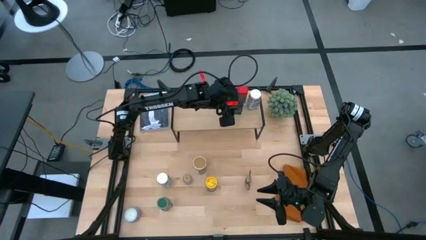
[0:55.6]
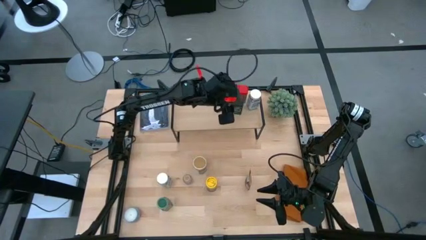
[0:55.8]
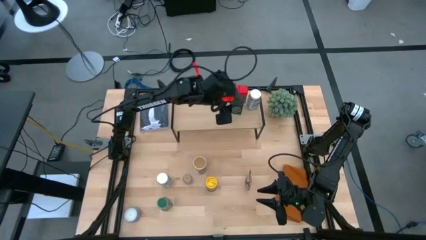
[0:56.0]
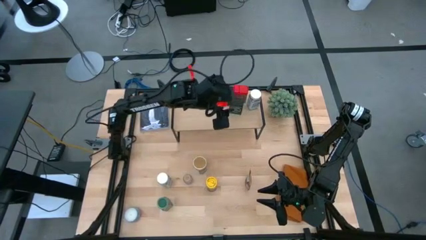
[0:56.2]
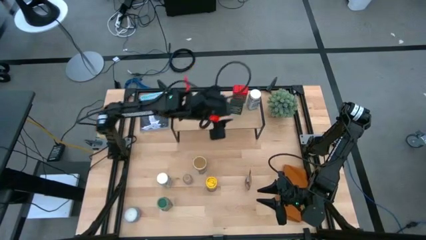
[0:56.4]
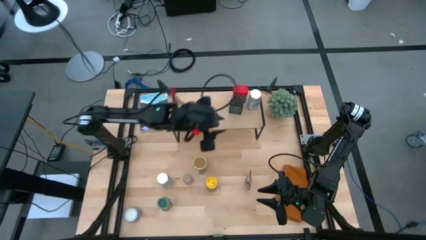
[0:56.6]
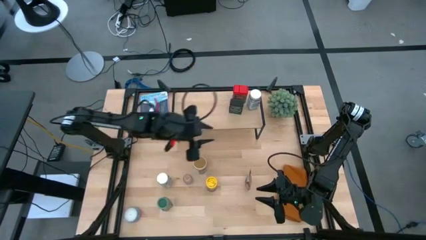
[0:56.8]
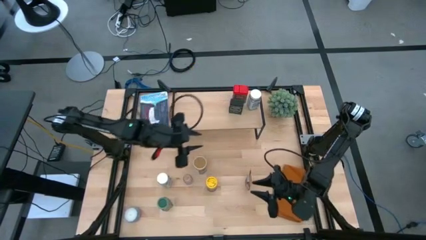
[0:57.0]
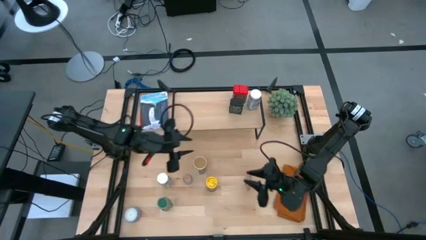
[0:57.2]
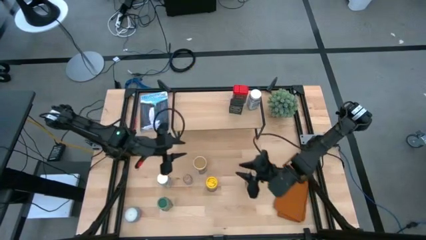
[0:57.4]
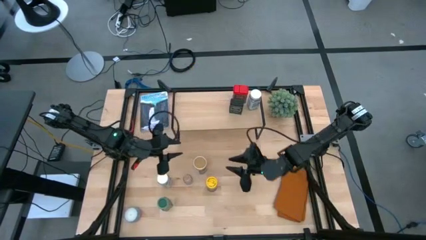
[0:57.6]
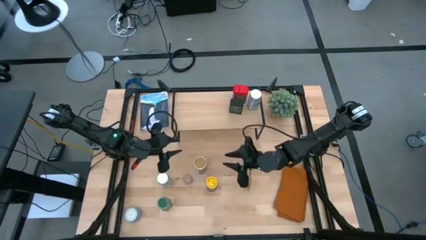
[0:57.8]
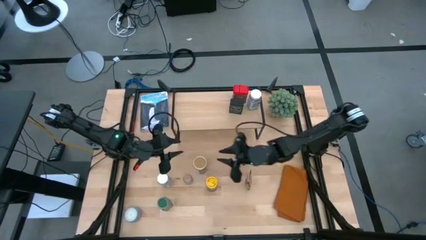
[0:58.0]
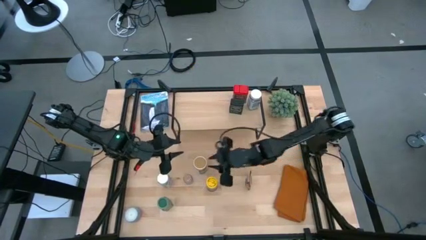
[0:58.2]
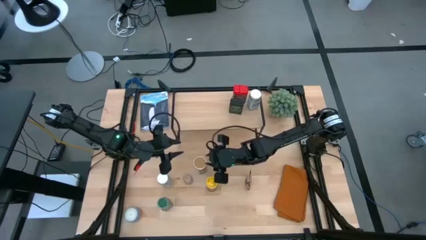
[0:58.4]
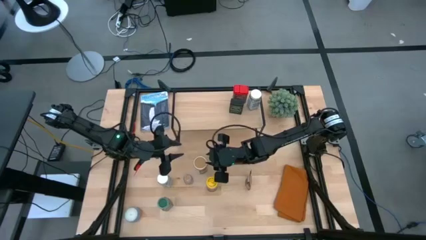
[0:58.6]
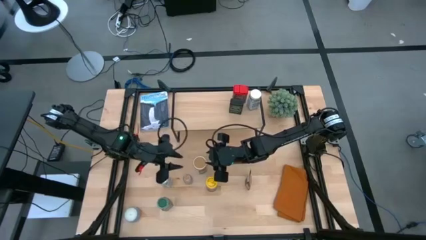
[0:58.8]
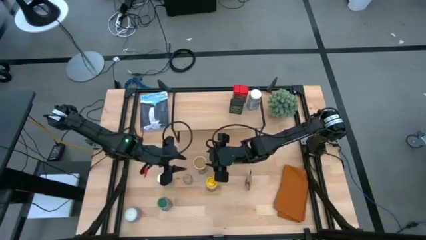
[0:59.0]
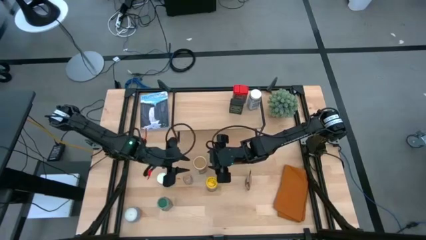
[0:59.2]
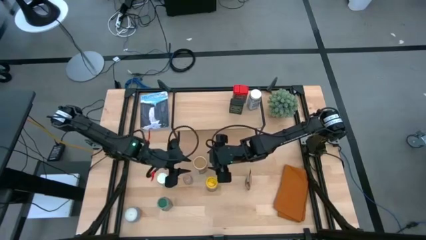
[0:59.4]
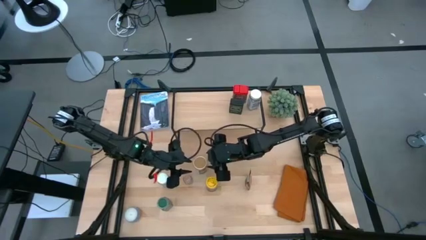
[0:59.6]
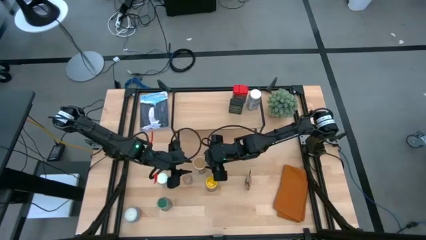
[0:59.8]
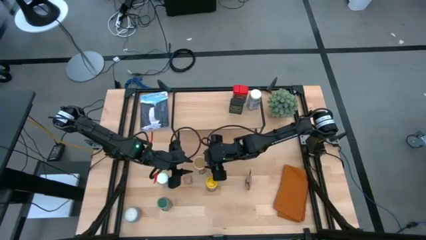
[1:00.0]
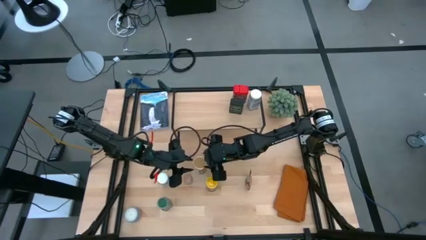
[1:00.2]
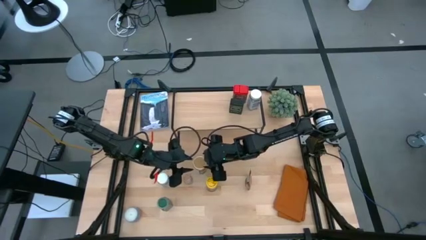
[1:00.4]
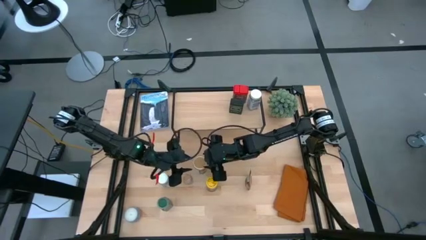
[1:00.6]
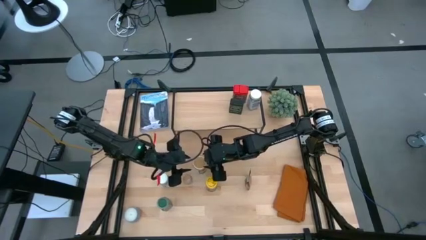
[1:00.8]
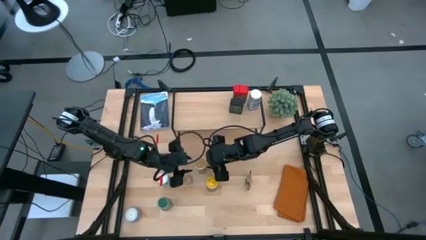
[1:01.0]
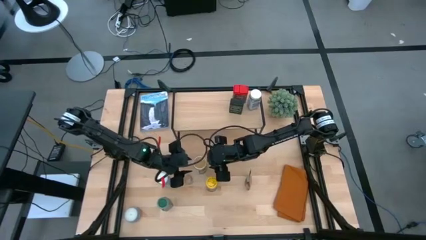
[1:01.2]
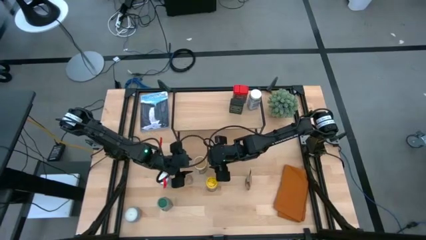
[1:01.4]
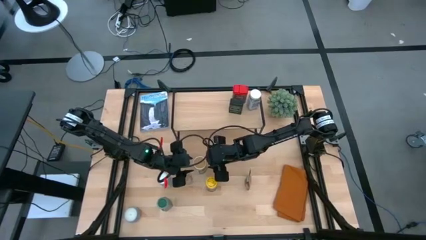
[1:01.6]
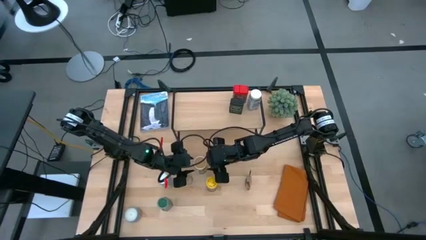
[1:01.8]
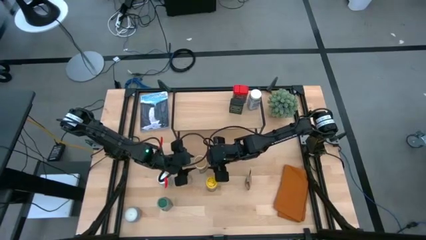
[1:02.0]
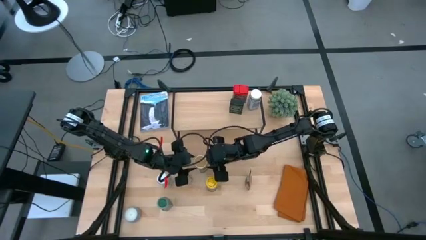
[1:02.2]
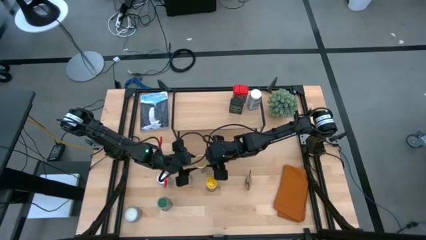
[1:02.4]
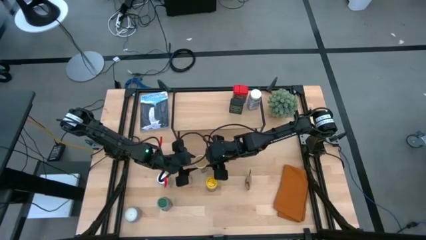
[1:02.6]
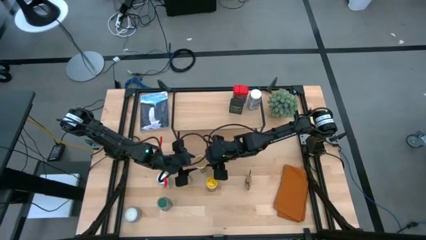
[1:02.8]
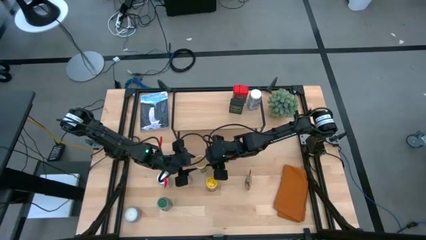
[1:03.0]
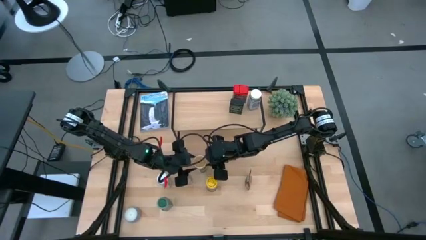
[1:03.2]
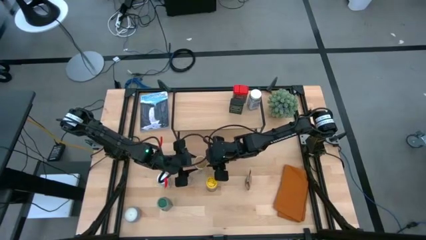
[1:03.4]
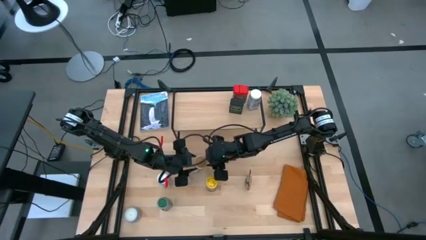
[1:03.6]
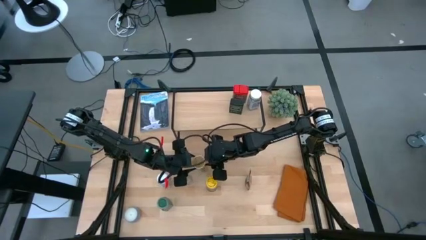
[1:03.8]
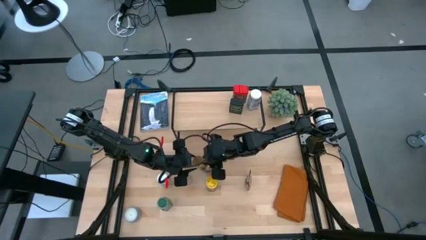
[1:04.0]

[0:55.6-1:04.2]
Task: Shelf spices
Put the golden seasoning bottle on the shelf
